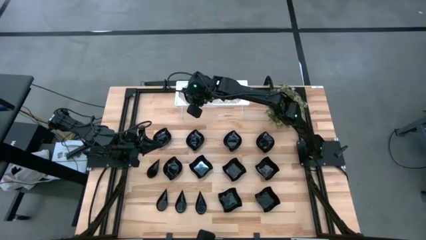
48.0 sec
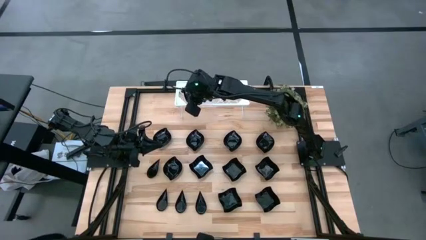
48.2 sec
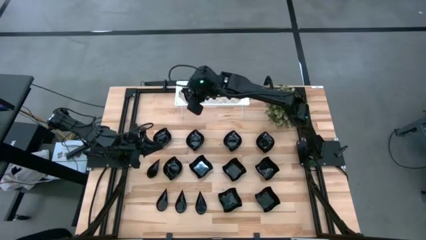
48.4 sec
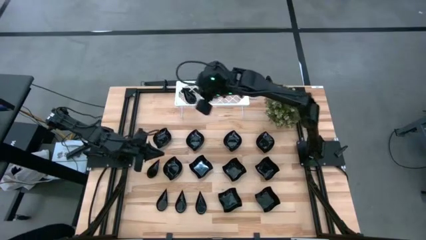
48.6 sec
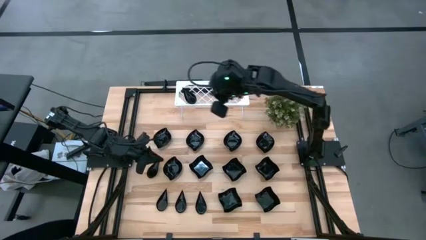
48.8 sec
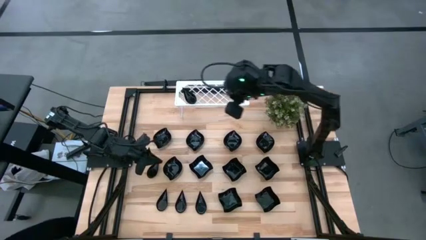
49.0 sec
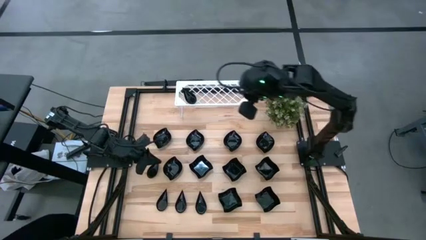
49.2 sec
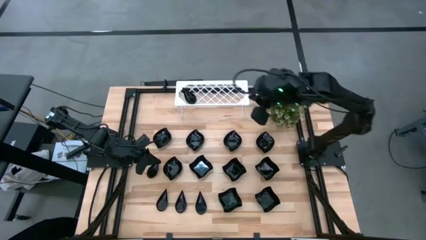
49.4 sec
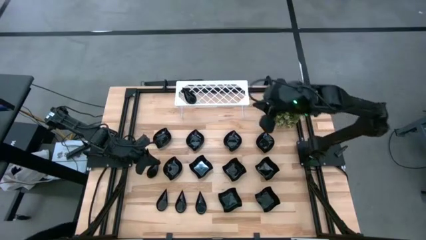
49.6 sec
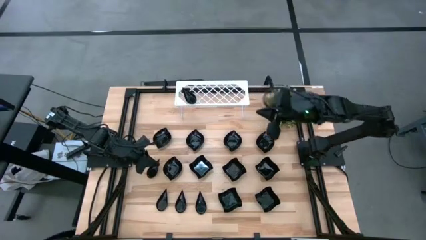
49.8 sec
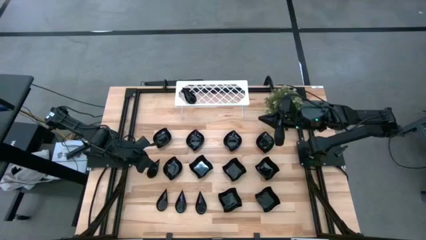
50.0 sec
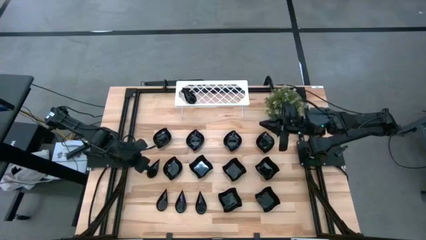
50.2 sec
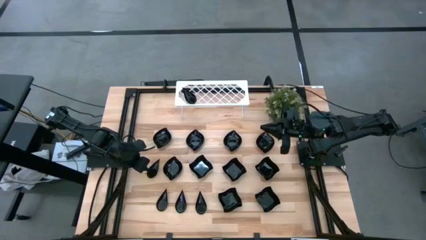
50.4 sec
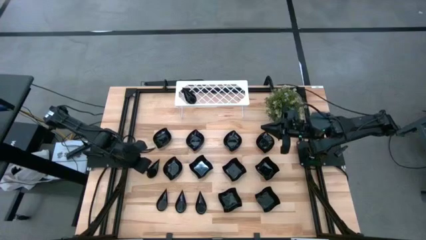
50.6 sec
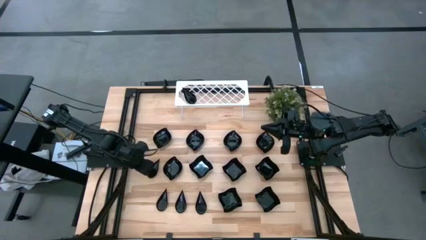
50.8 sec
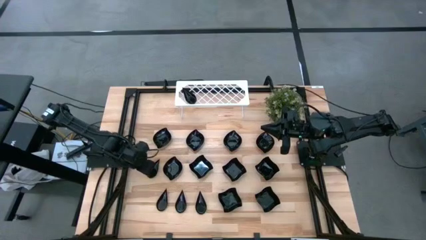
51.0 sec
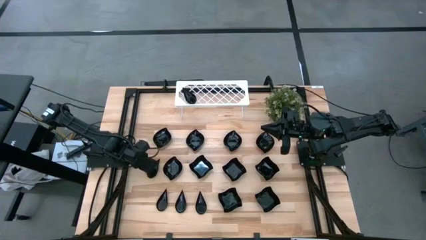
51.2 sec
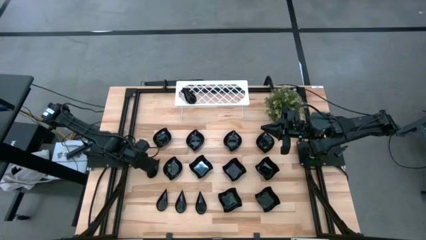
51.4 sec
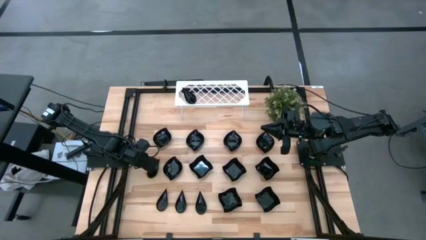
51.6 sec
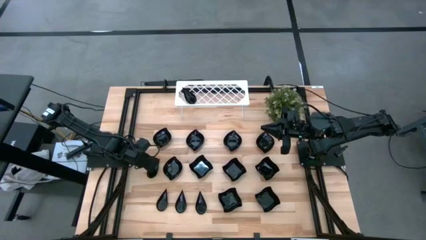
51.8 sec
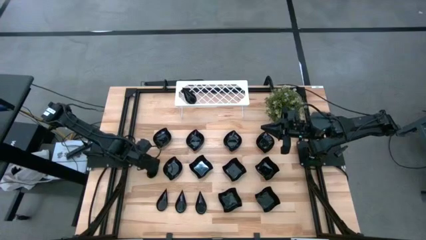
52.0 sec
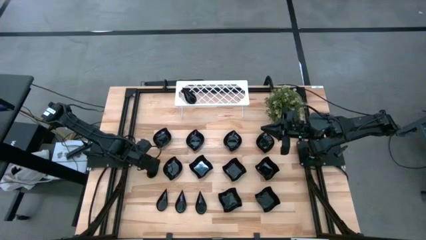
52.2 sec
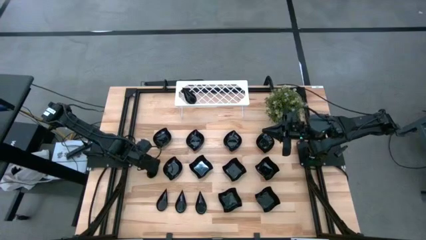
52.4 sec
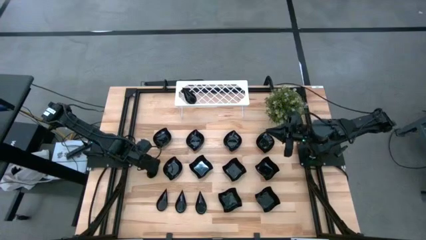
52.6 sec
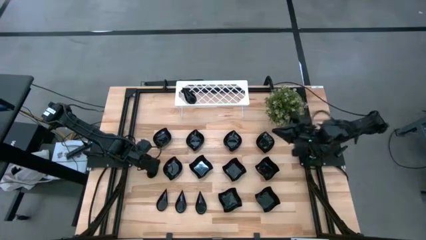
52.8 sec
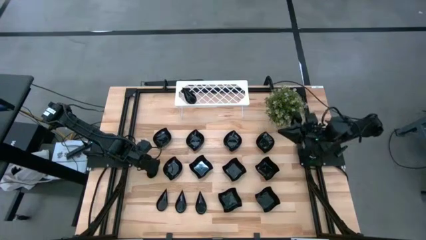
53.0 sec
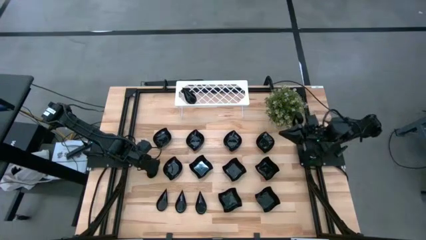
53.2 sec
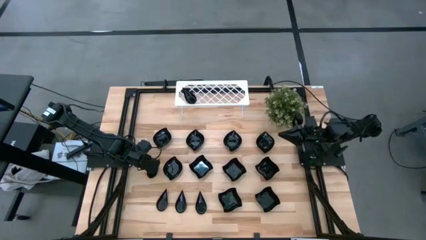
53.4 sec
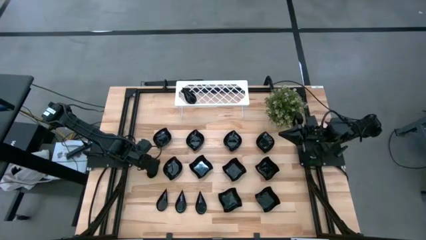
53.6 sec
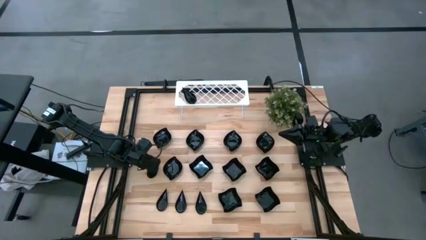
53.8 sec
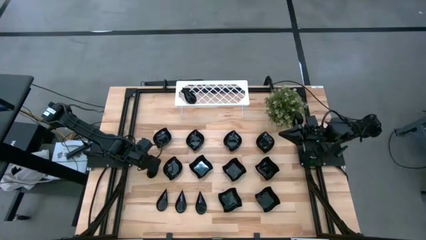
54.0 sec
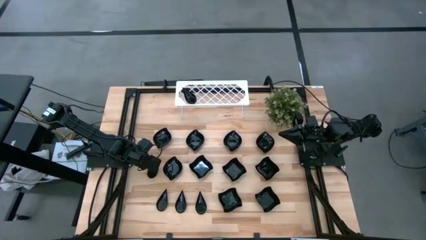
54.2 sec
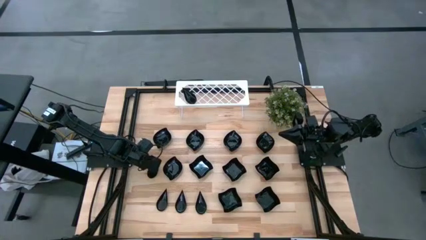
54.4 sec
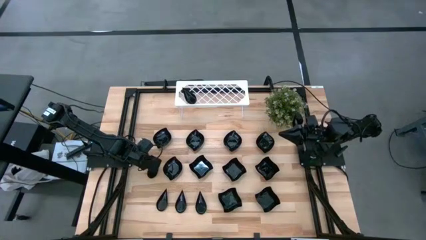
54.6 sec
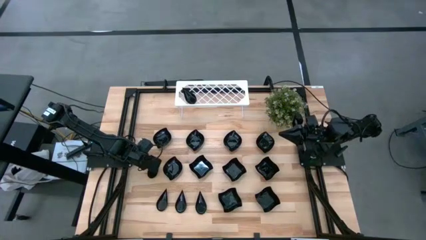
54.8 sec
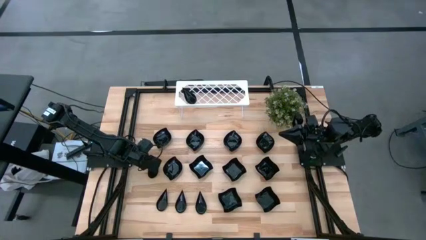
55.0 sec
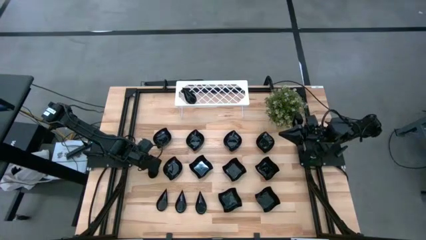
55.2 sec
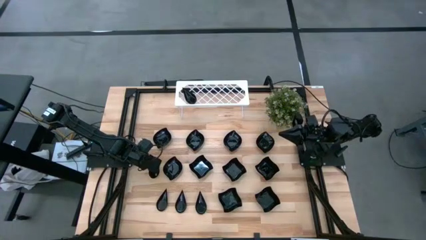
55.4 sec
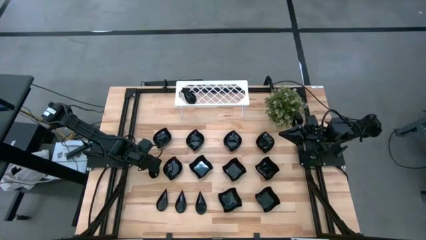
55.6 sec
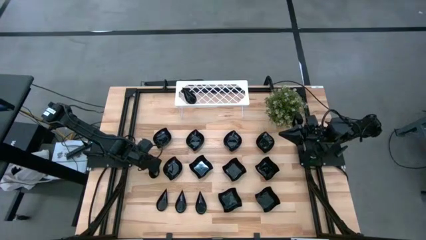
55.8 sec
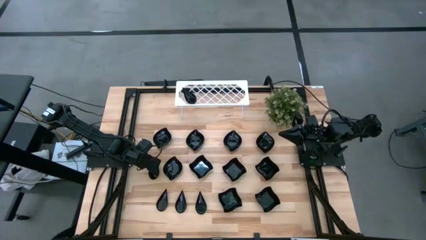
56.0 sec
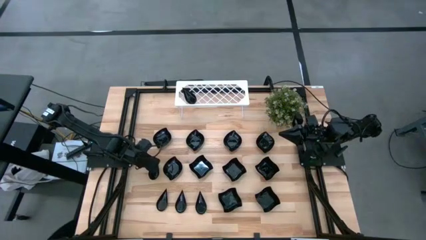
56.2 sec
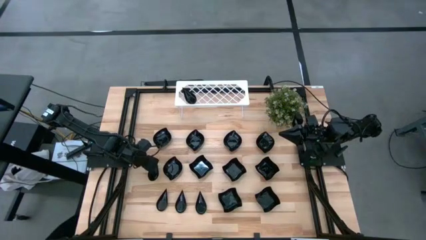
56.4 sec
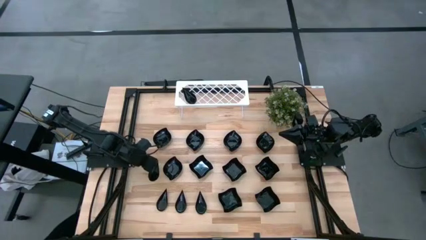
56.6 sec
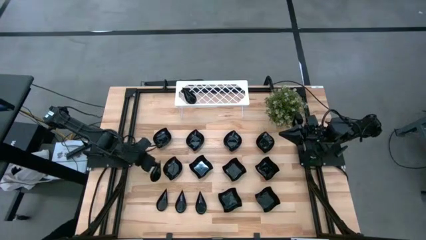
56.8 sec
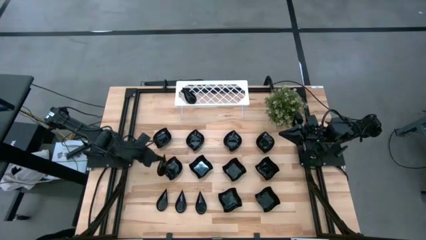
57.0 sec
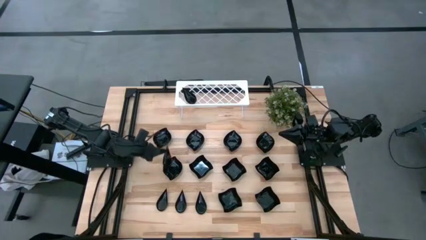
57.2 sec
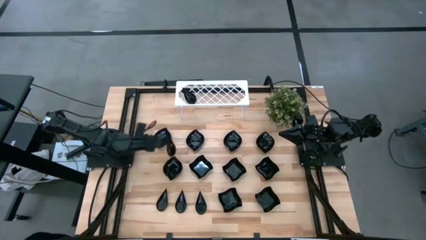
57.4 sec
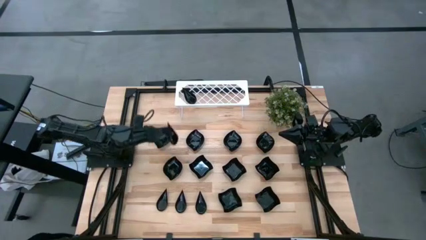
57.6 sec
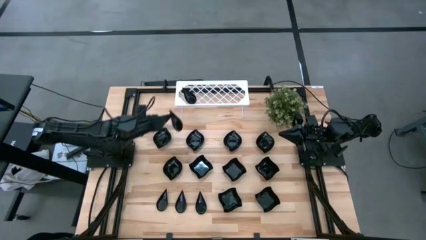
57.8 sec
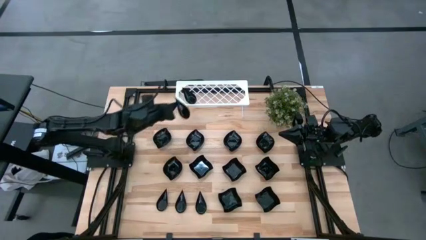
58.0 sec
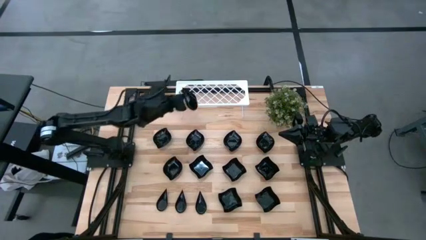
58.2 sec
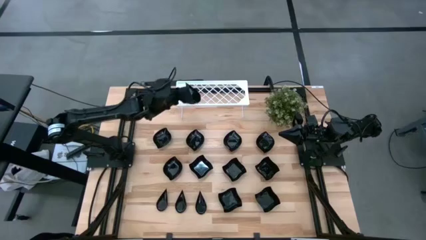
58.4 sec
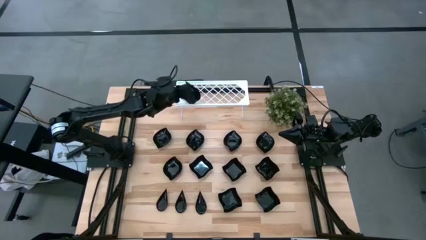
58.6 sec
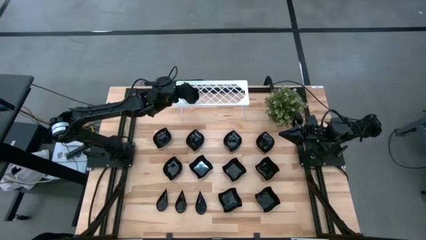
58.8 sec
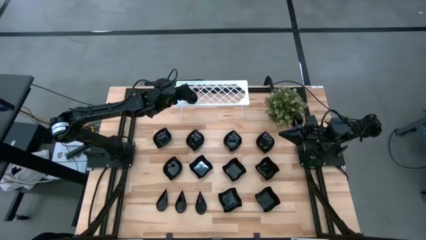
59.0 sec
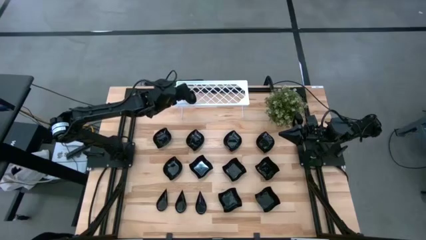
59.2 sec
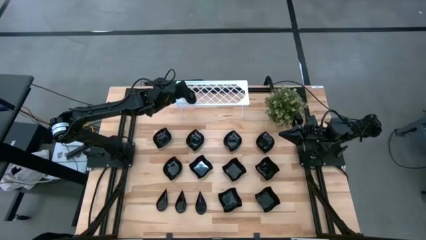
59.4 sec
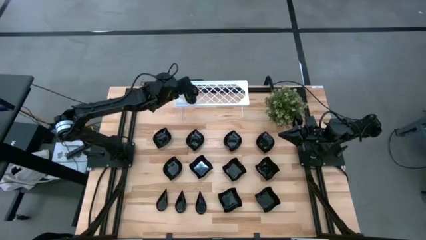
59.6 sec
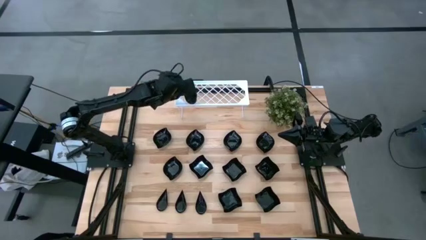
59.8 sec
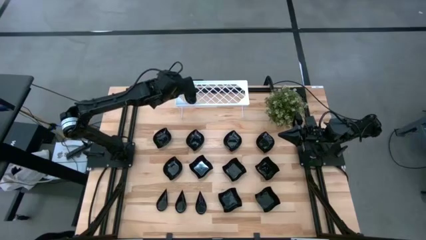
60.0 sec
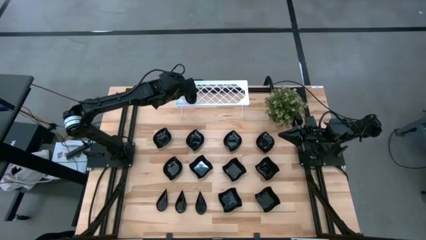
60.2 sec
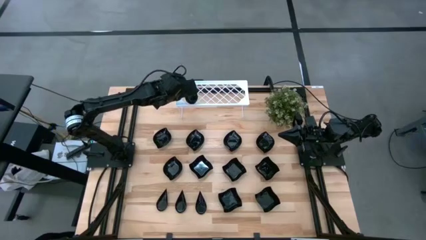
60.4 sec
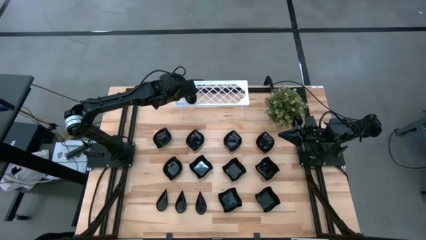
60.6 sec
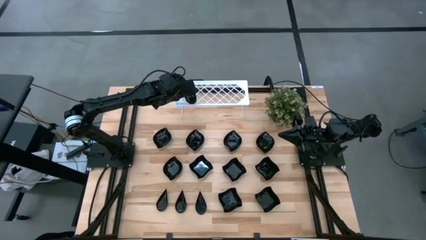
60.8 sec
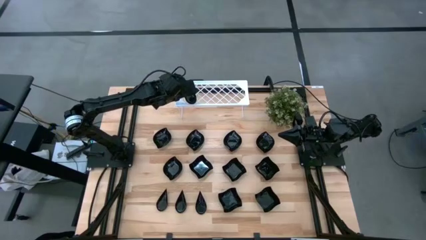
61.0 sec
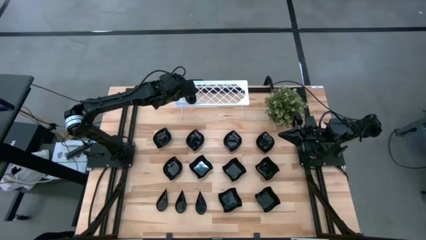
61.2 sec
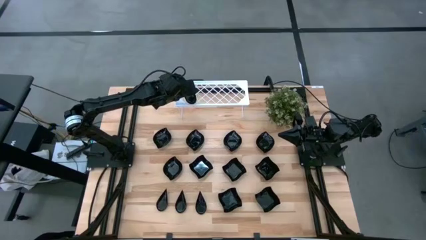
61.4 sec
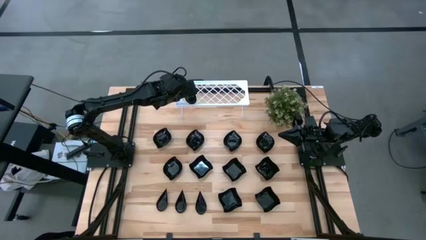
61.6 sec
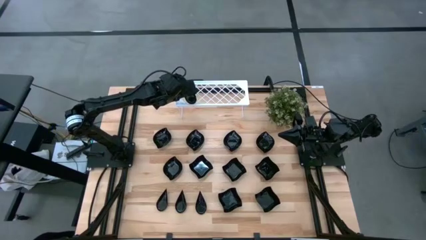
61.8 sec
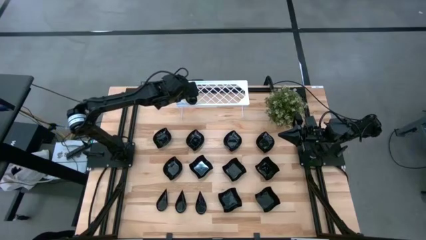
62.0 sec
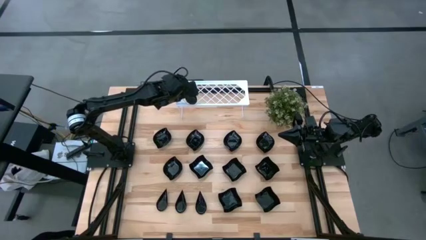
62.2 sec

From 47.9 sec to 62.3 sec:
Task: Pick & Place Mini shaped plates
Stack the black drop shaped plate on top of the black drop shaped plate on the shelf
